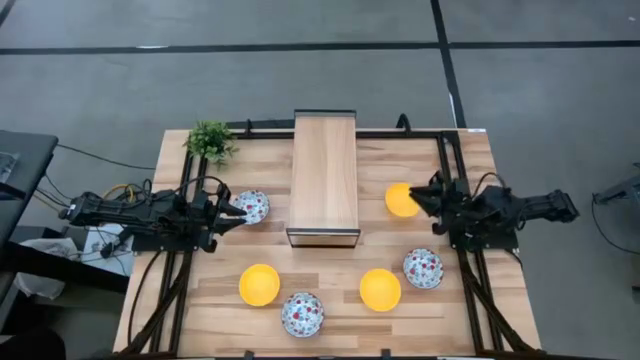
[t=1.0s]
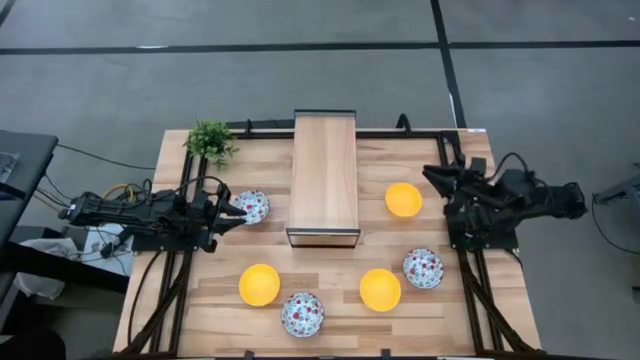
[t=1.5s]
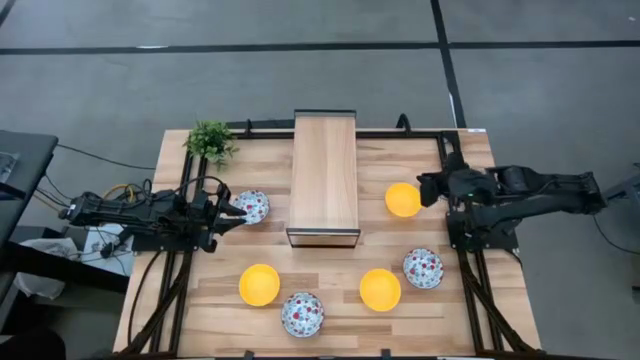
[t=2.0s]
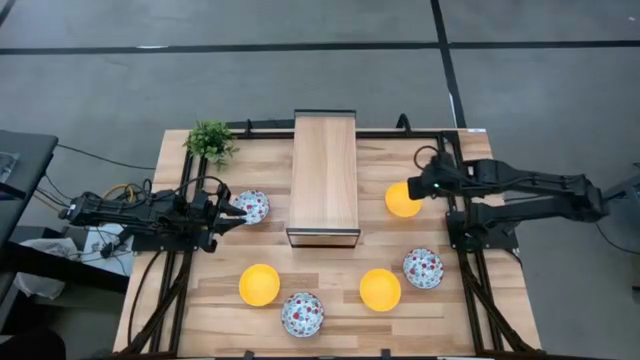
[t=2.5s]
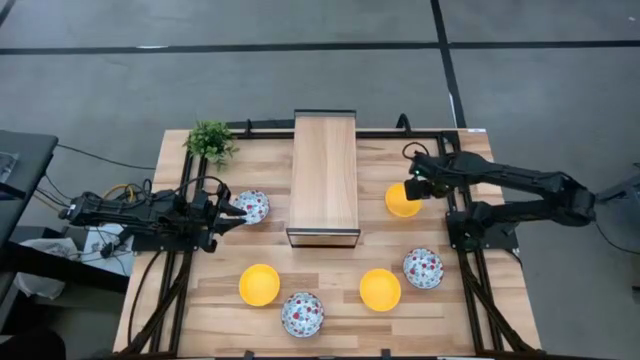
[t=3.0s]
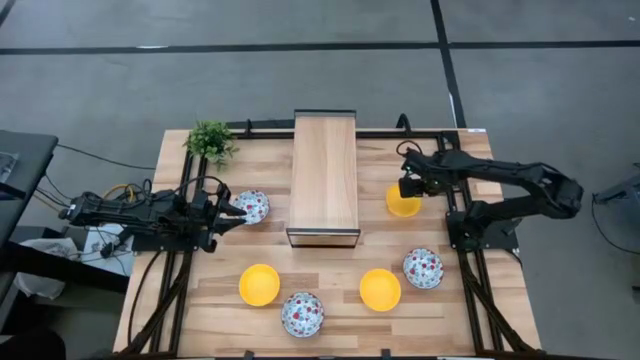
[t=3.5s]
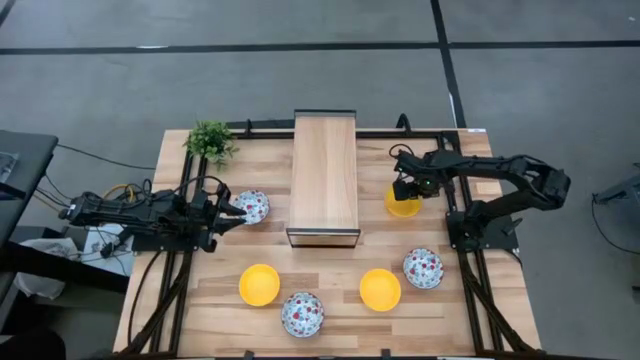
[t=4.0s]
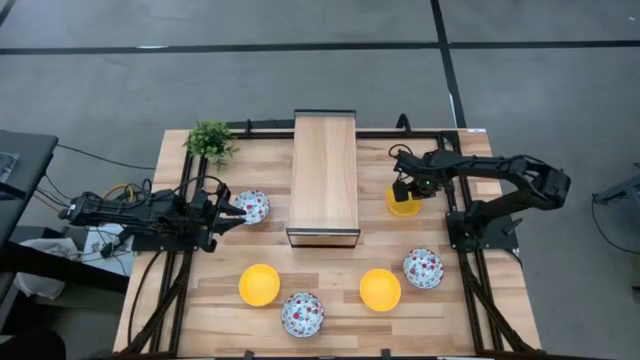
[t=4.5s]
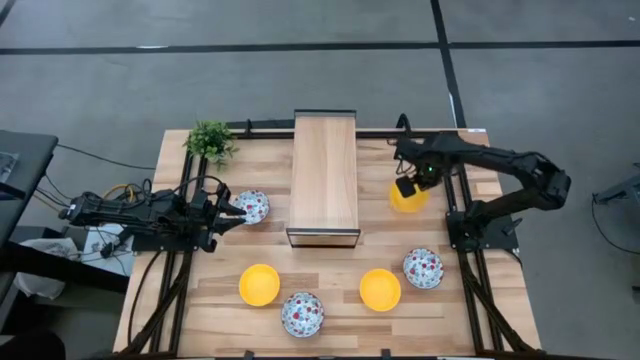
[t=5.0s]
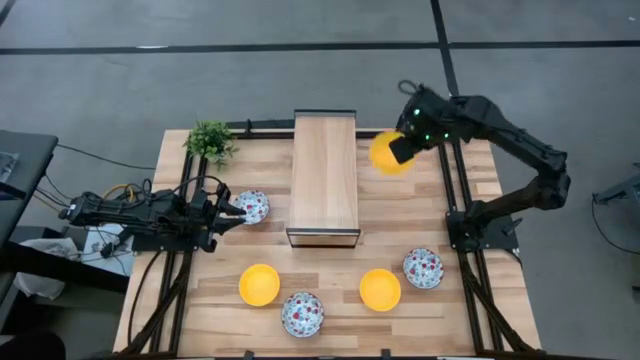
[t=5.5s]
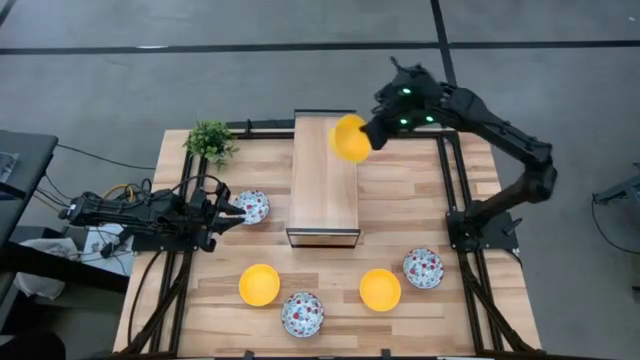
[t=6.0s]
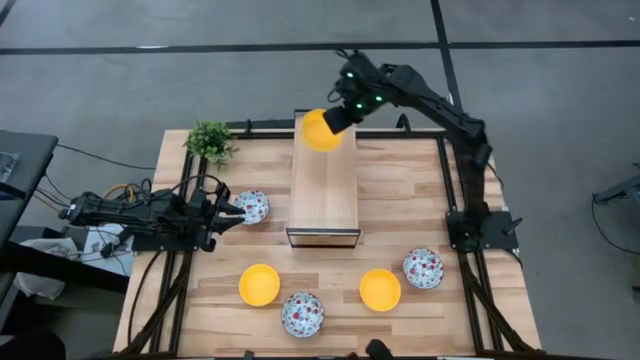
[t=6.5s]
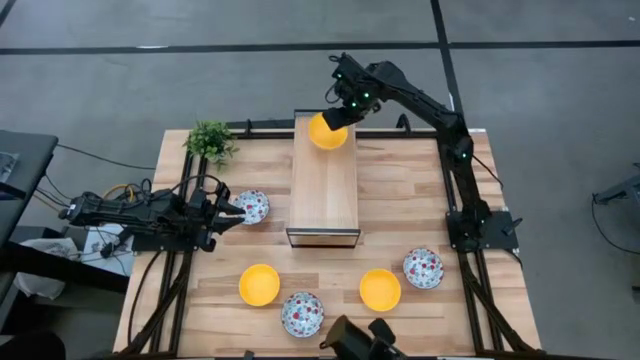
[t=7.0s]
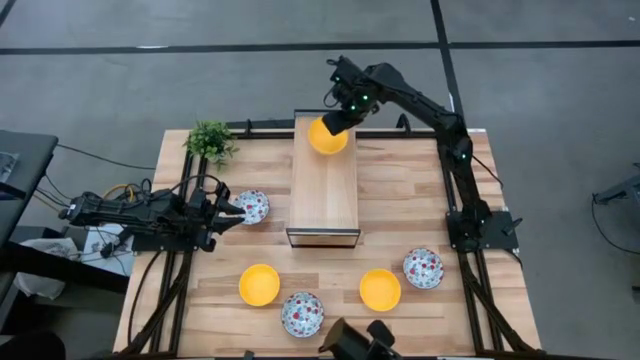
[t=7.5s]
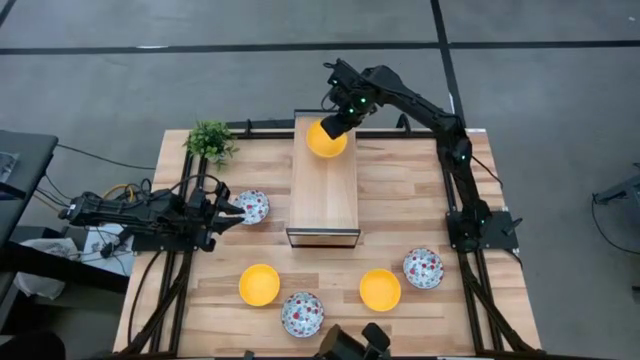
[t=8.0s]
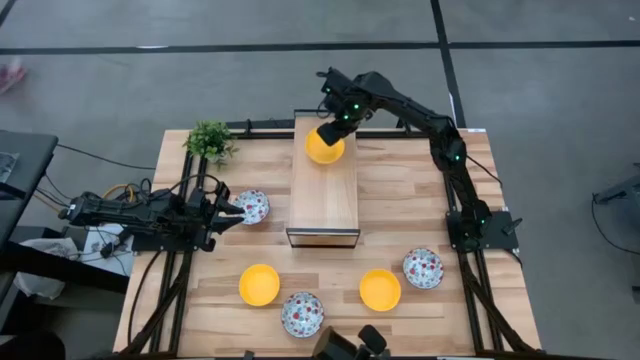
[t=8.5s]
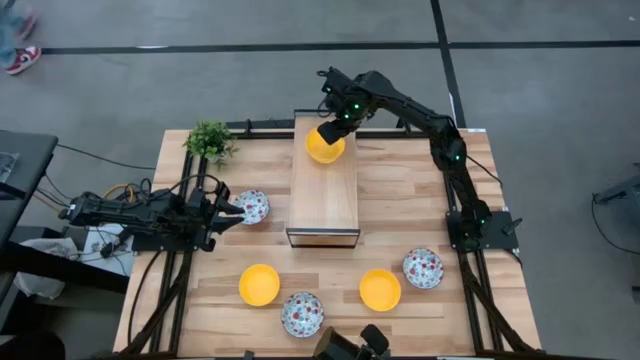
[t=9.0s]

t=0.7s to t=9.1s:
Task: Pick & Place Mini bowls
Put the top yellow bowl on the shelf

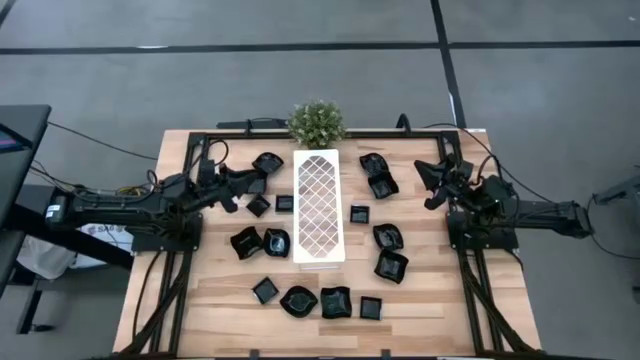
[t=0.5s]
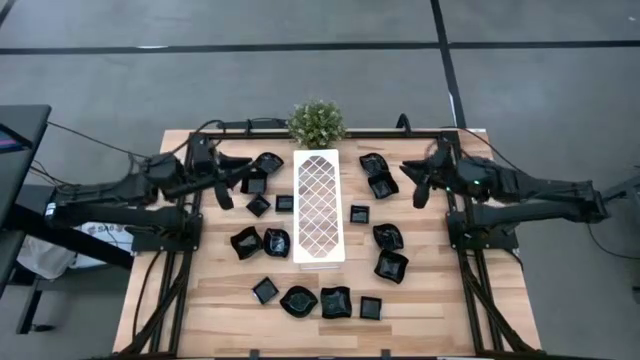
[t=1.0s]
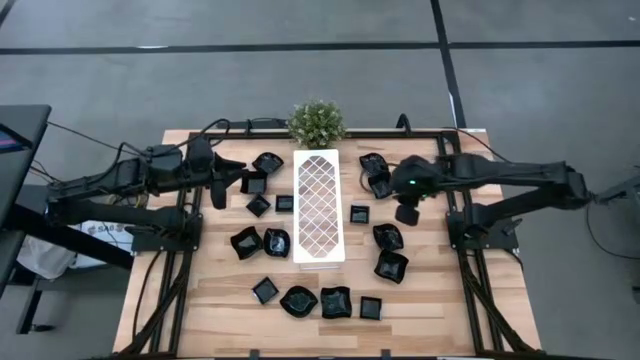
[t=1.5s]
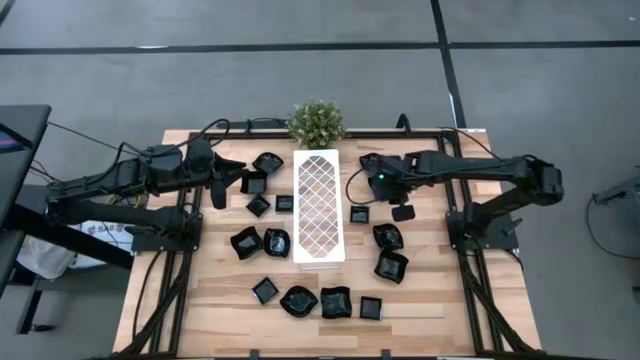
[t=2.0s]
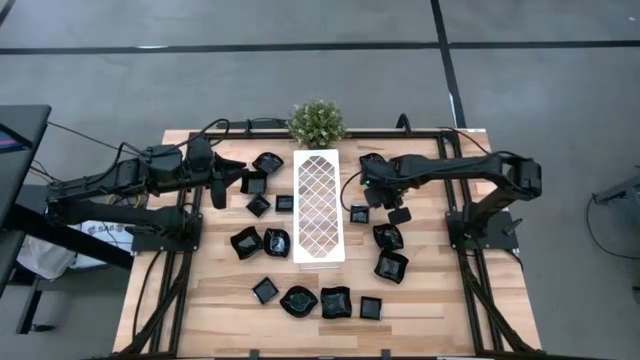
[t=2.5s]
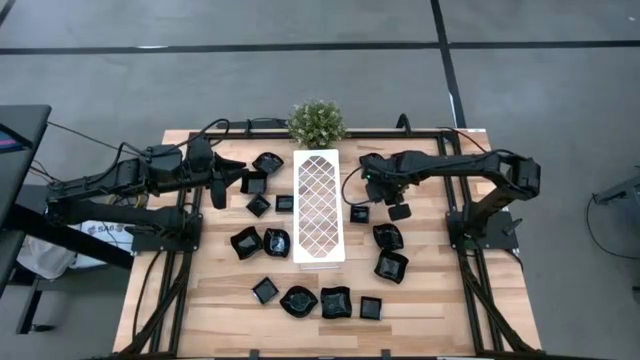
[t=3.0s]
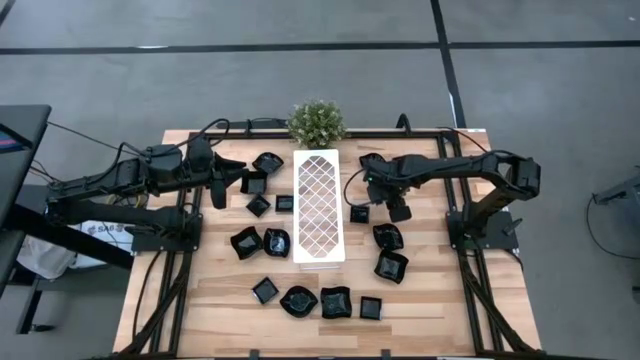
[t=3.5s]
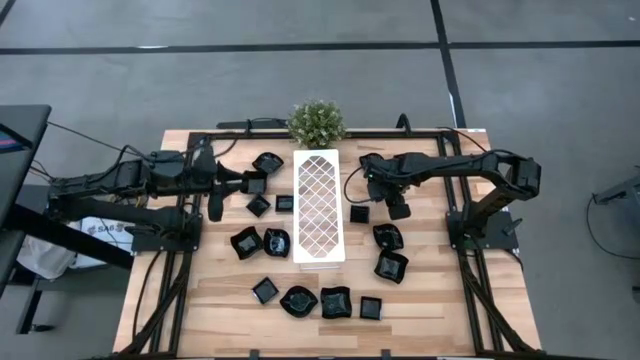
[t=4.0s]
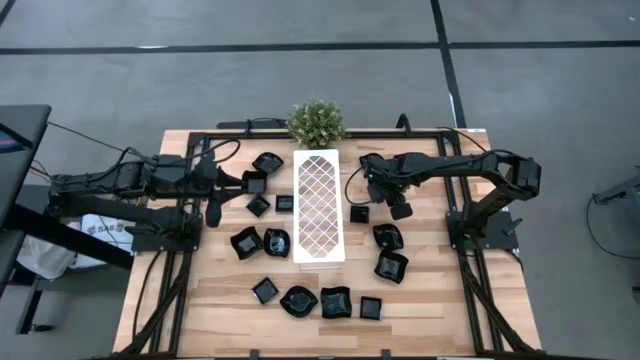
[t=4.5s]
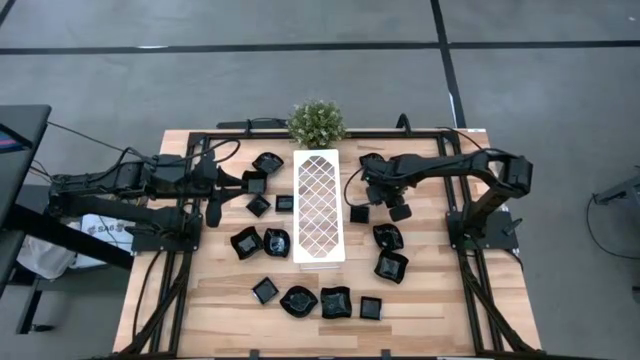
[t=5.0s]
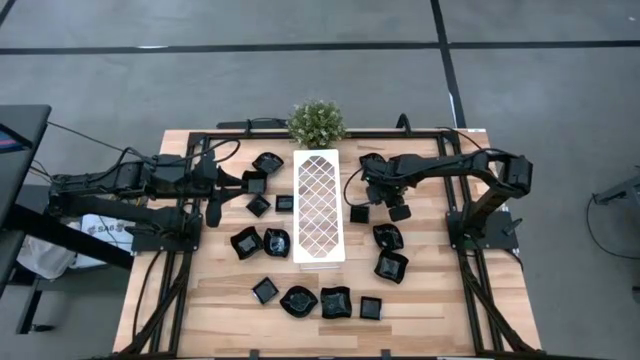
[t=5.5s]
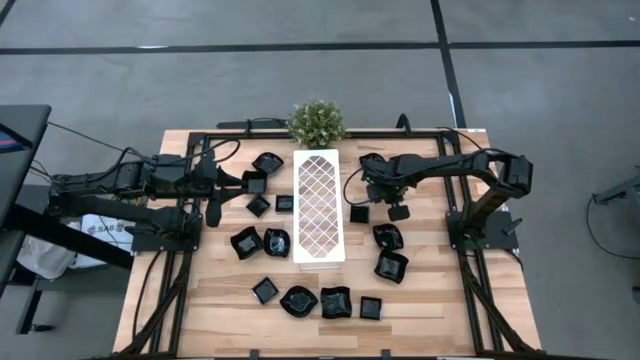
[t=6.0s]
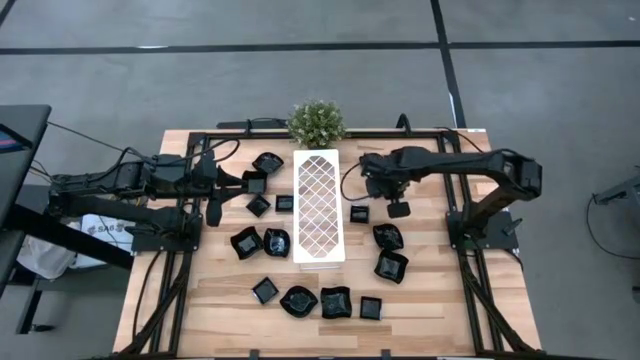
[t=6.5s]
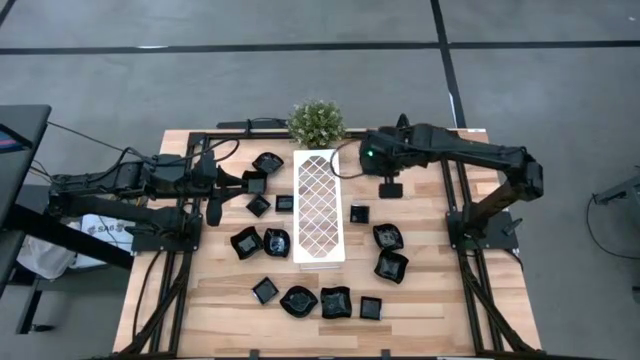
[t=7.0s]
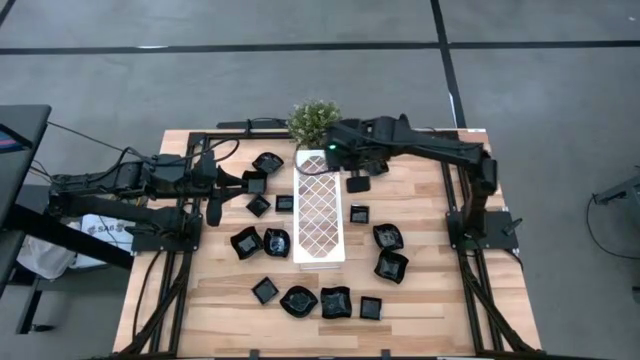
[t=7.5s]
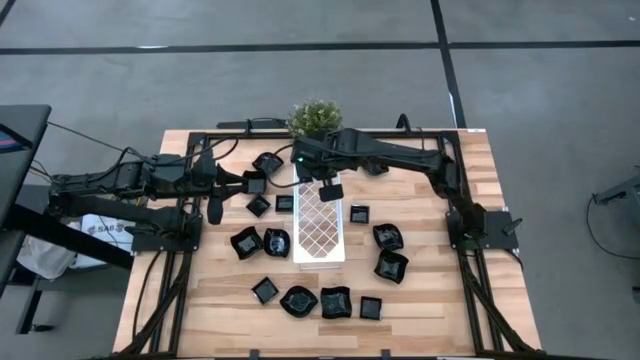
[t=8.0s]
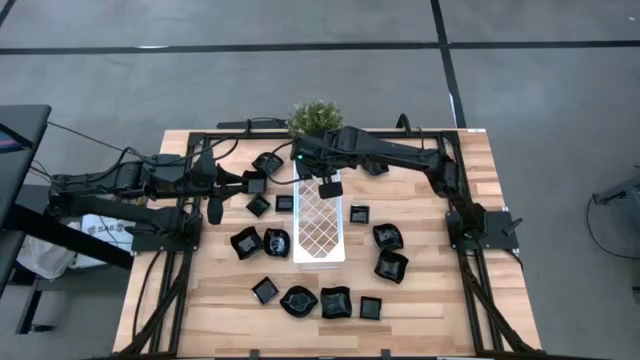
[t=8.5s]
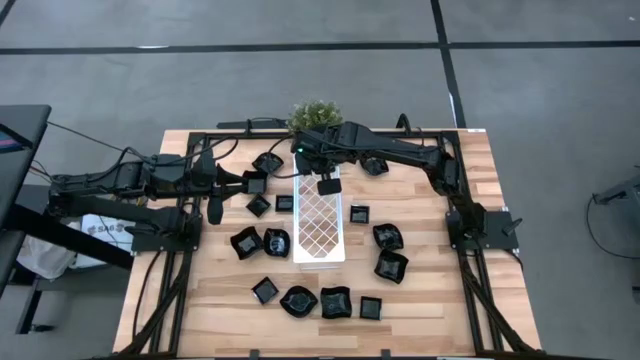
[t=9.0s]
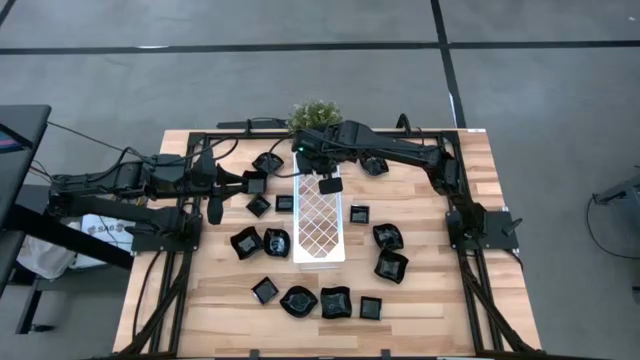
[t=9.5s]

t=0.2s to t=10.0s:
Task: Pick & Place Mini shaped plates
Put the distorted square plate on the shelf
